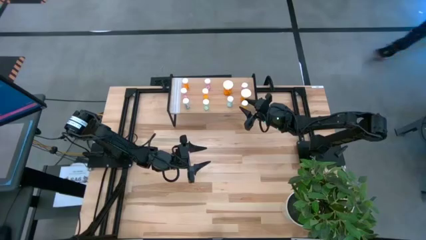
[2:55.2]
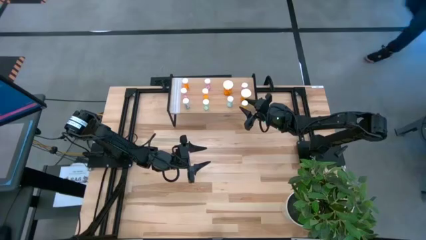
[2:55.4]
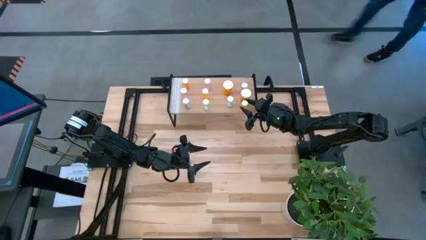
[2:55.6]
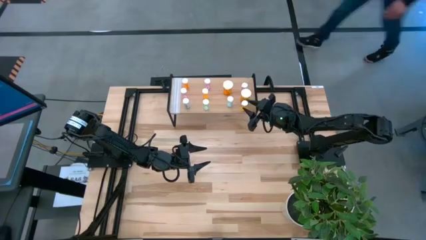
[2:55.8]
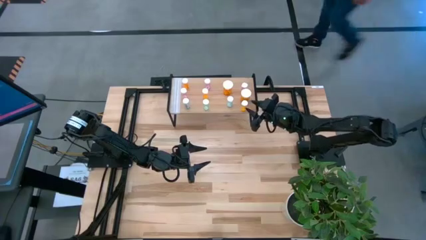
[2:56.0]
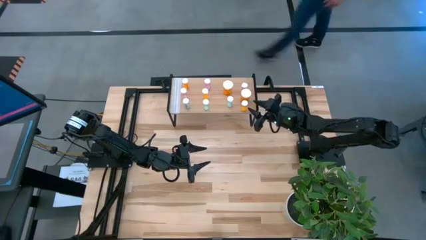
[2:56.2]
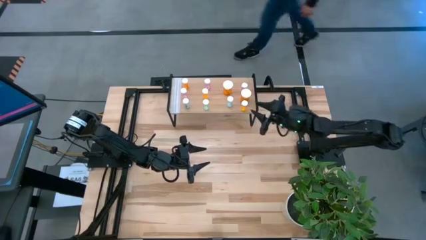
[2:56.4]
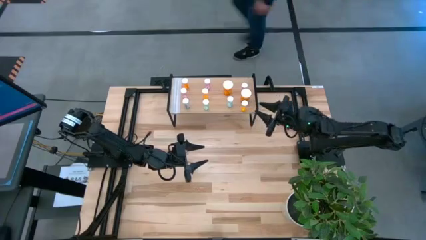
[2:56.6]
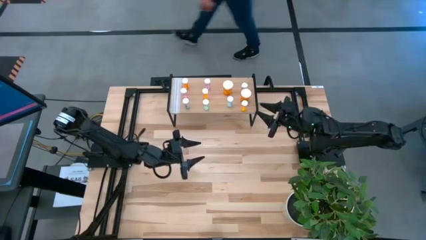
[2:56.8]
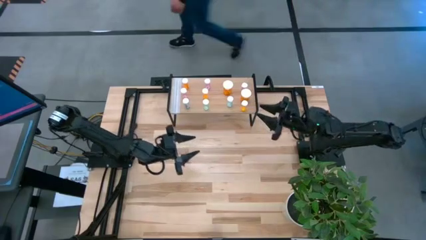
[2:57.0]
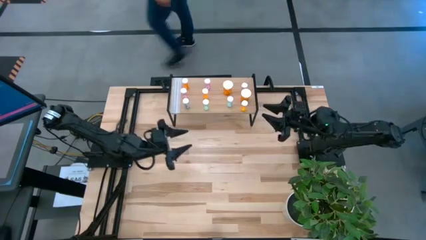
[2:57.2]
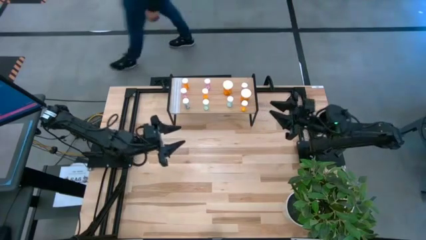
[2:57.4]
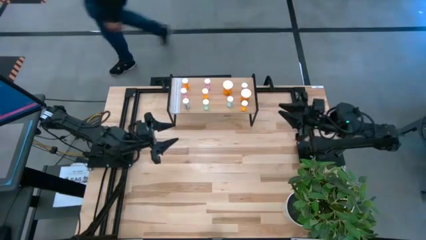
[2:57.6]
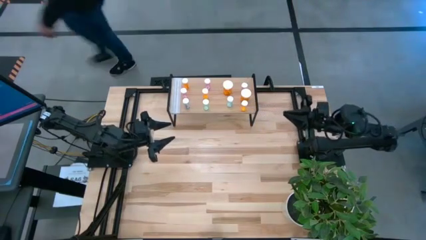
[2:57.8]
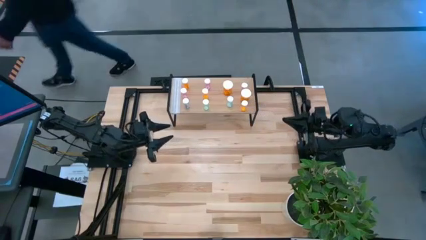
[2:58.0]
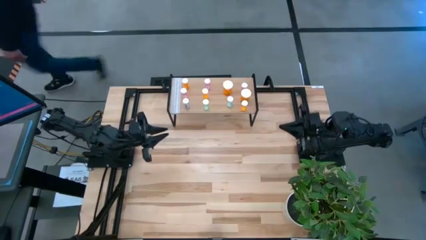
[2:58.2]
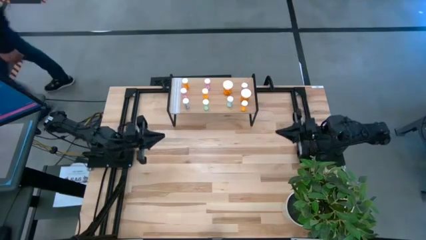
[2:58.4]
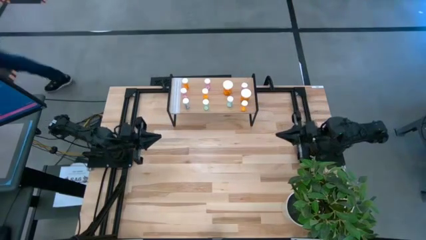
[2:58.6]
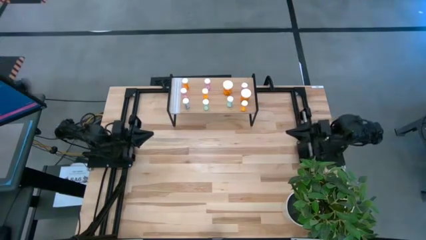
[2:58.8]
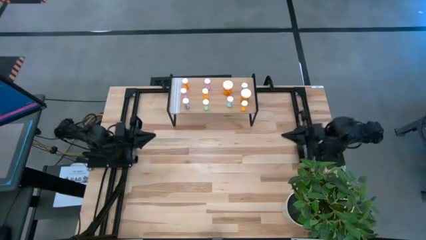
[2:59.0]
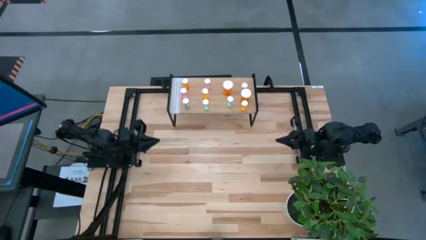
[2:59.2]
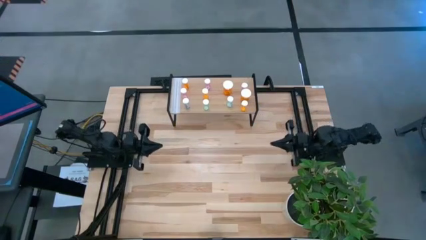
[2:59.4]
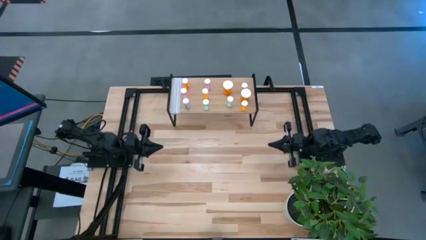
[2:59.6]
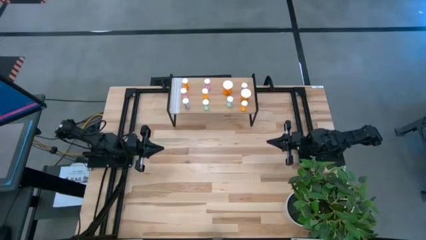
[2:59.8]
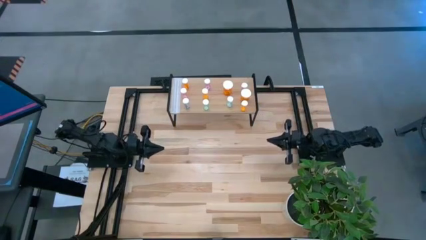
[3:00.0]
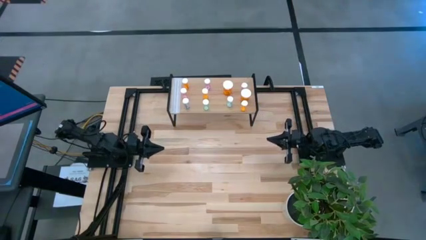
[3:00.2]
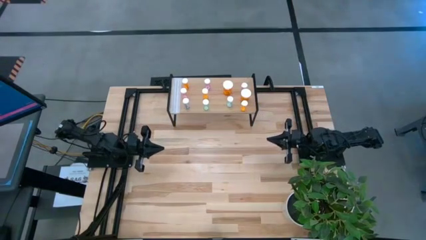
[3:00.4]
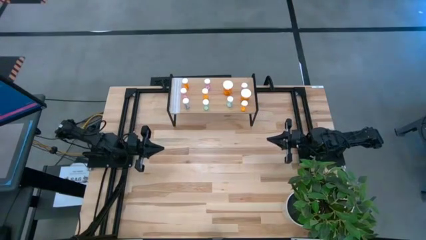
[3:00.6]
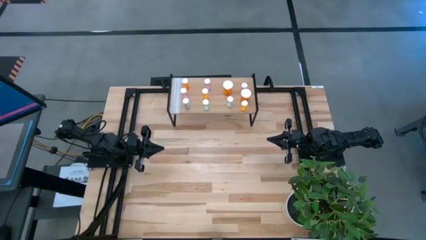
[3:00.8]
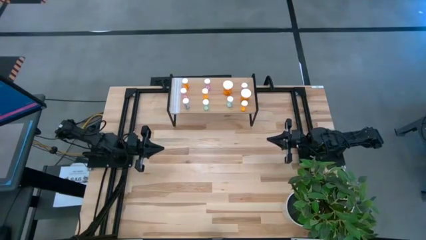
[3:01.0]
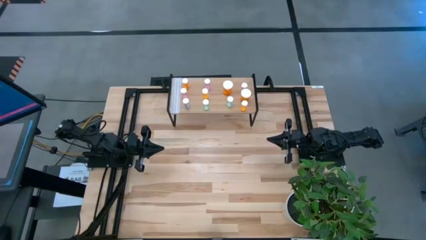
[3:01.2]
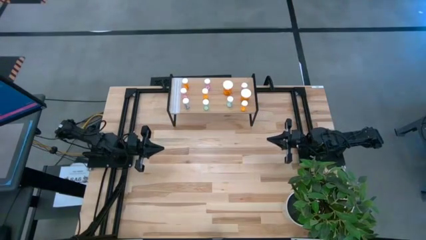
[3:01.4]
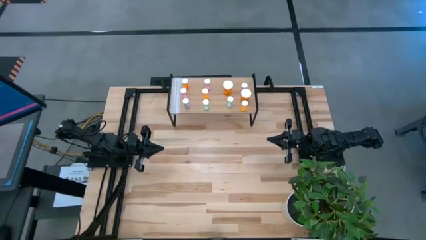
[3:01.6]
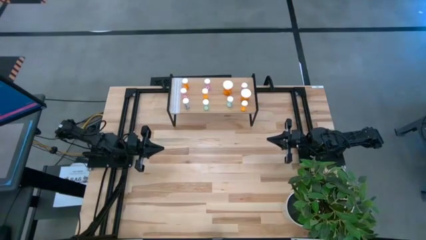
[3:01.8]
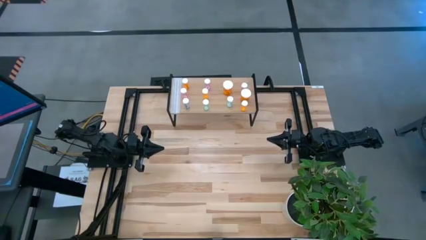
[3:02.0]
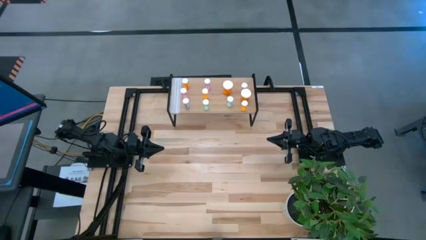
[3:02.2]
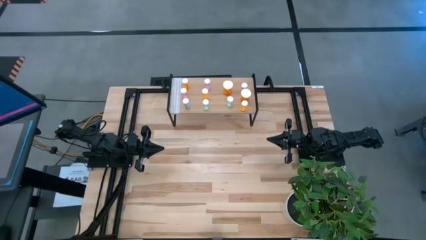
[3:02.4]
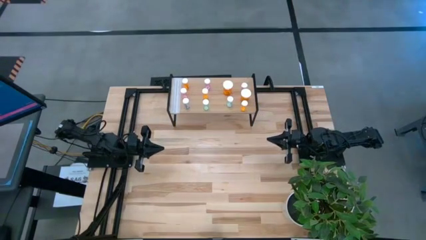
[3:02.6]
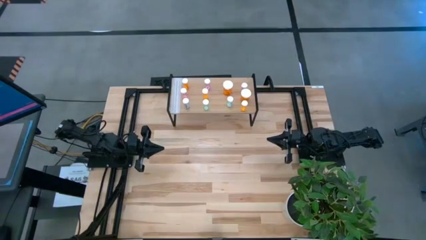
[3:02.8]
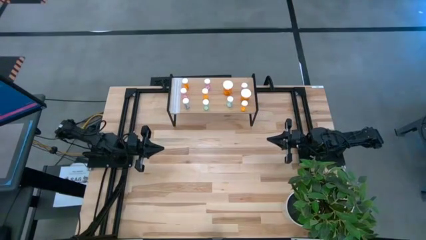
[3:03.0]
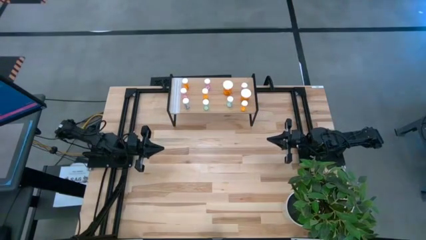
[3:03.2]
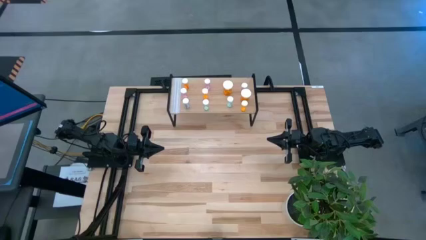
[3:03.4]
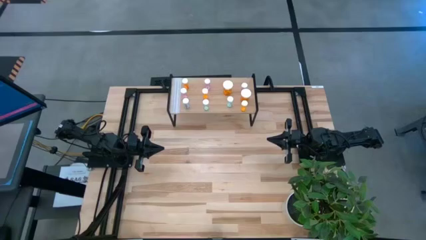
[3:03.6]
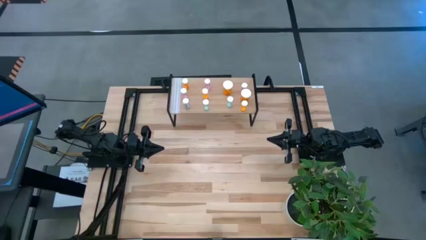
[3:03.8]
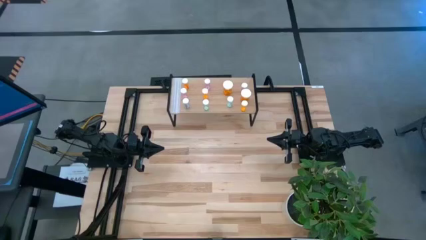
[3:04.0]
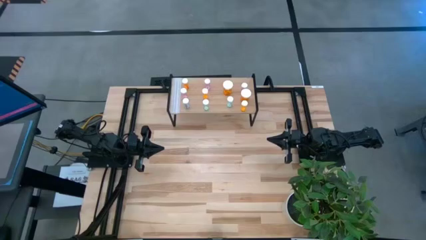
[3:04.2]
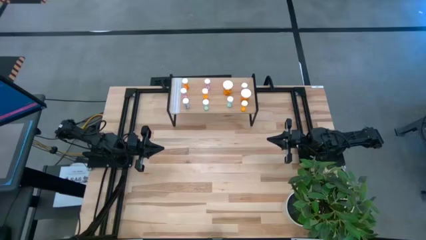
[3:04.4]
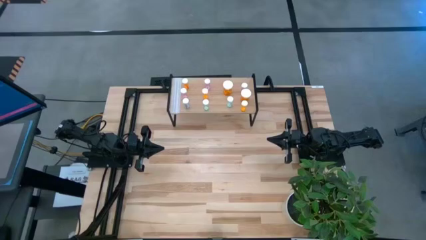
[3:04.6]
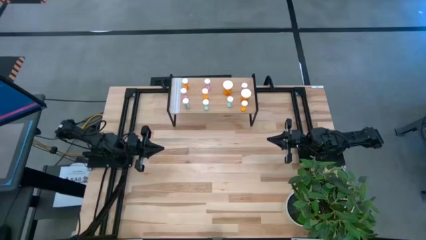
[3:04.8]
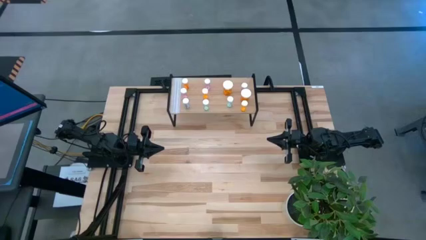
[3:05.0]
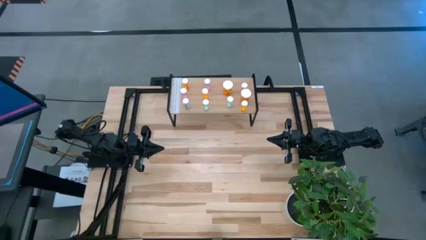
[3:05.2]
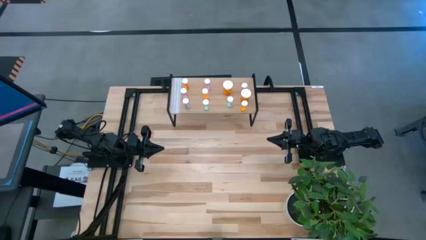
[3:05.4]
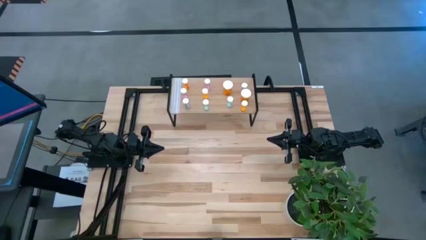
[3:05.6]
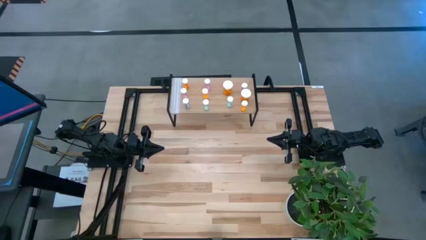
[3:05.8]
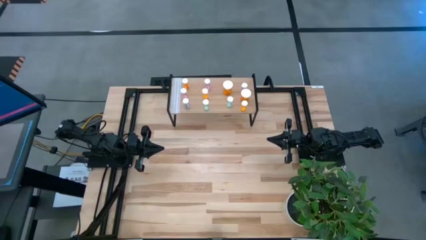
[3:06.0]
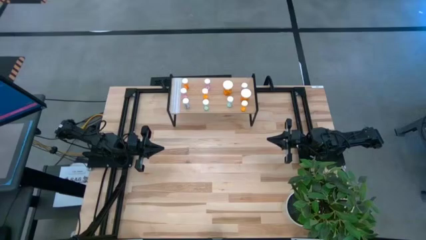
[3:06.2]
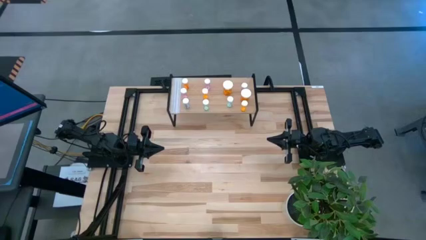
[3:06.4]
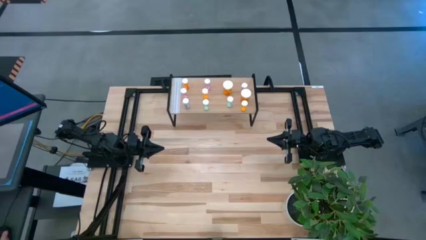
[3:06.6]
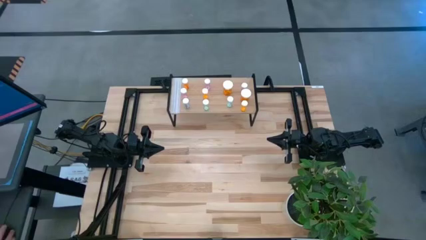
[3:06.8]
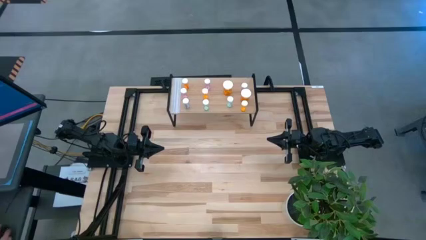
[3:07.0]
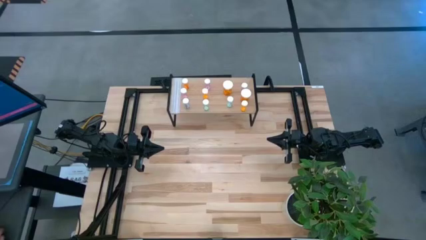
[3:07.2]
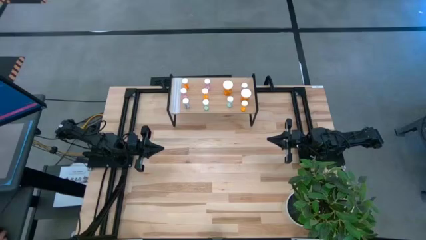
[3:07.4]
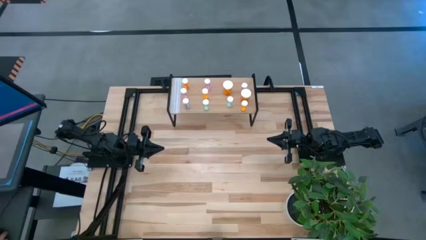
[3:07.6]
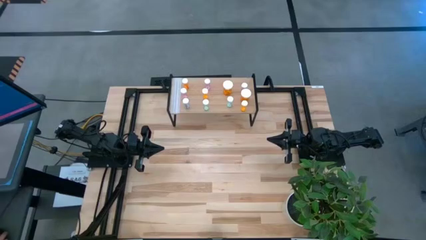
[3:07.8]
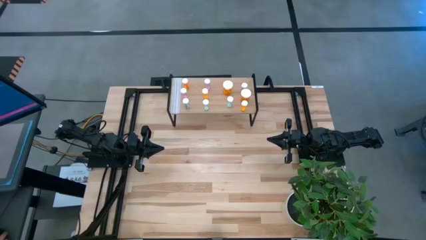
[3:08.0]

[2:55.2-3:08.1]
Task: Pick and place medicine bottles onto shelf by color
Return to Home Position

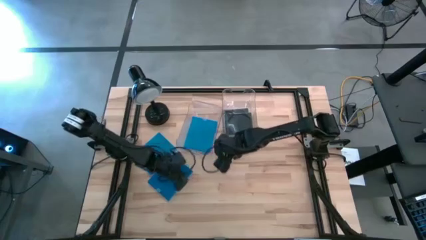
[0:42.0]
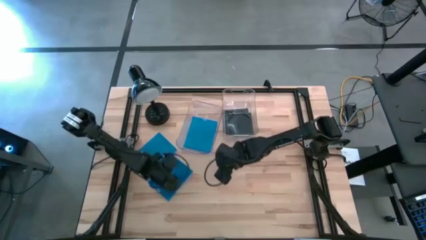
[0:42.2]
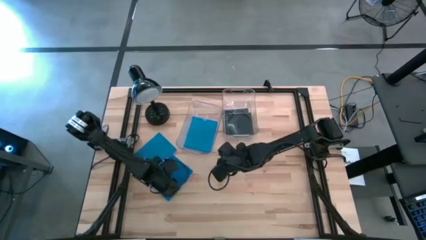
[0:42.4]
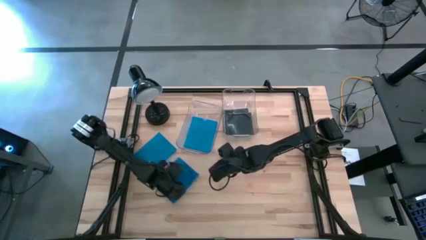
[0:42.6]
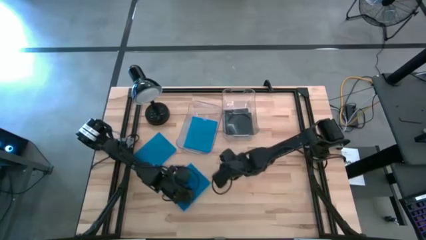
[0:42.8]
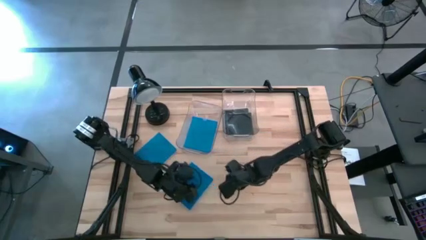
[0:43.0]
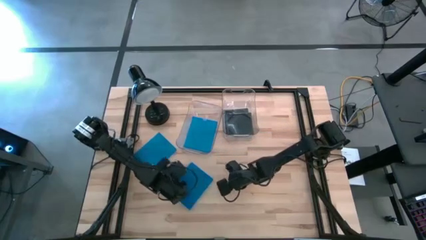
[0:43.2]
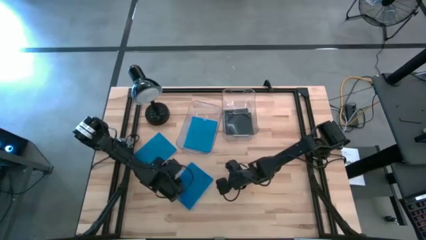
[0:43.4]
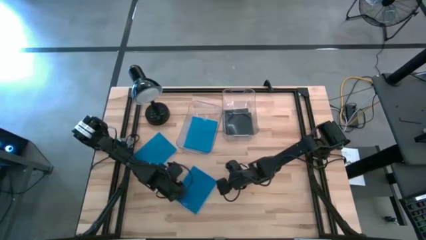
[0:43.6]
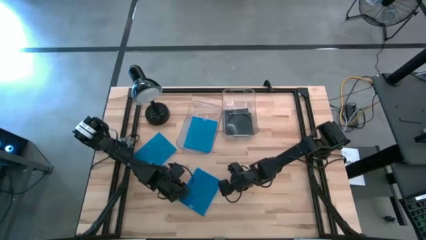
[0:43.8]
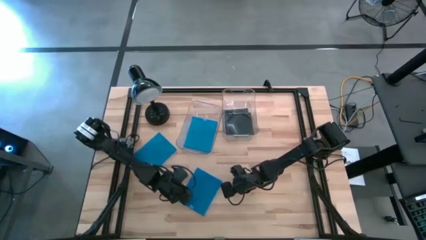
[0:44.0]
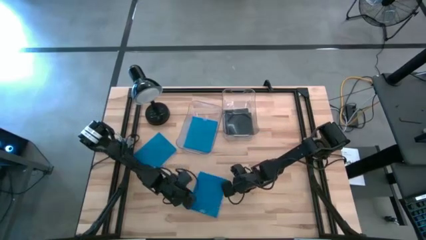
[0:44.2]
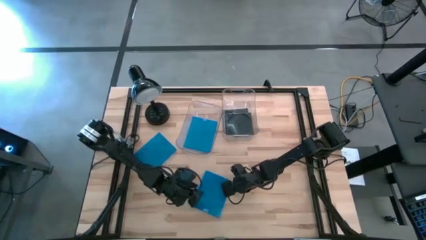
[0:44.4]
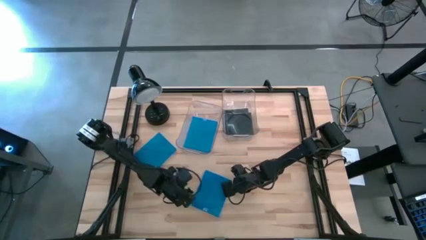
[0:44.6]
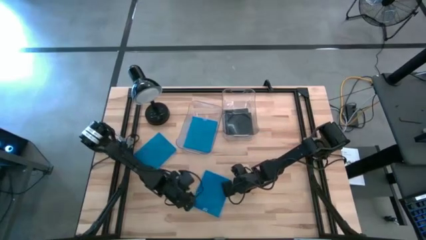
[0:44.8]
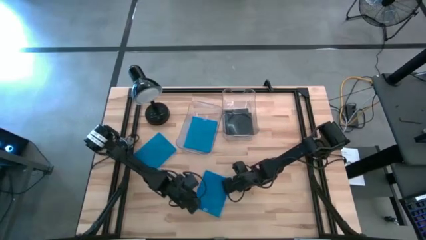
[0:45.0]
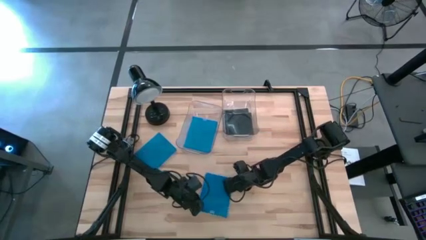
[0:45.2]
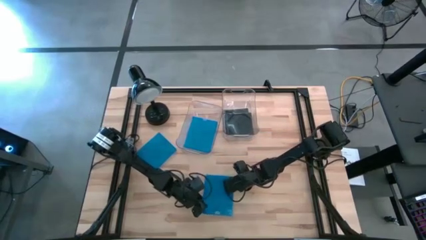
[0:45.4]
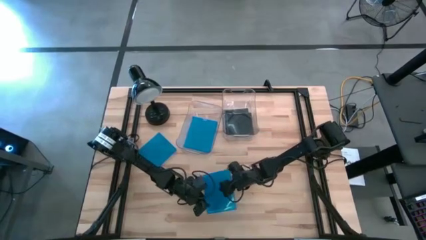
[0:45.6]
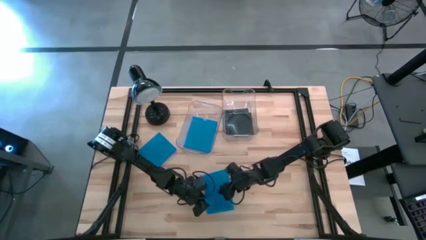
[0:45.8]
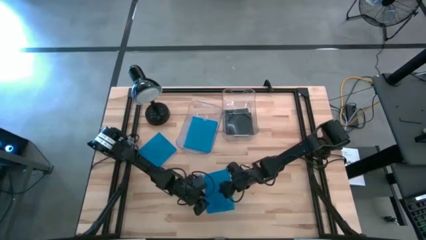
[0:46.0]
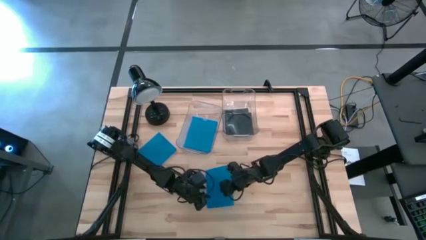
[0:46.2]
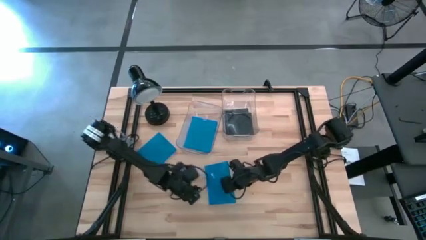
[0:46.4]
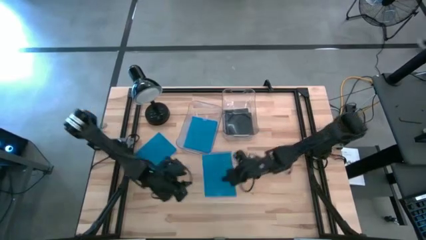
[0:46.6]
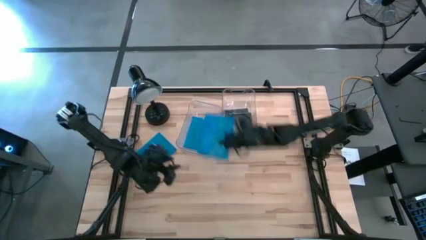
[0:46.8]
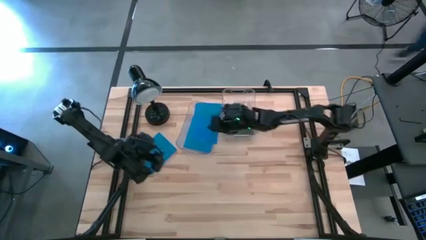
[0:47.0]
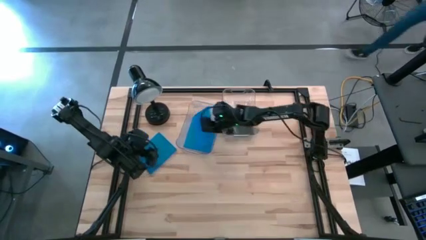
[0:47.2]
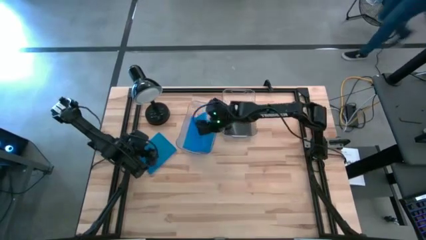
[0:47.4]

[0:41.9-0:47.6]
Task: Pick & place jewel cases by type
Put the bottom blue CD case into the left transparent bin
